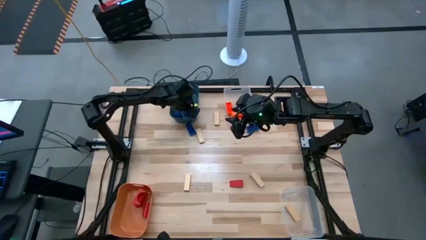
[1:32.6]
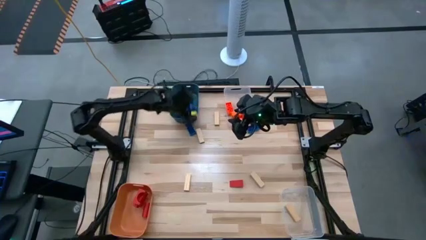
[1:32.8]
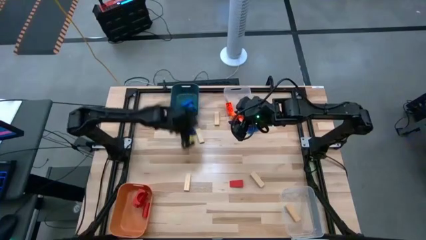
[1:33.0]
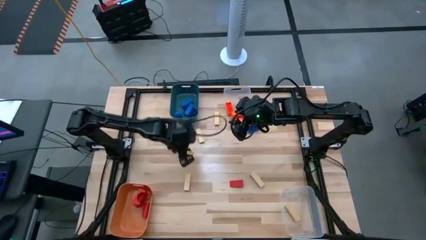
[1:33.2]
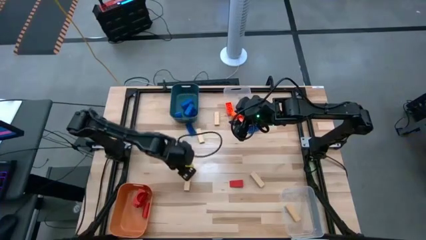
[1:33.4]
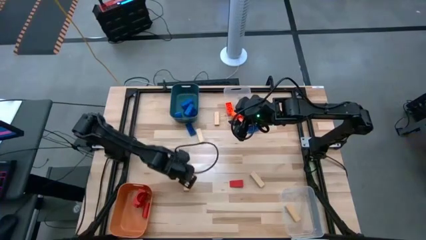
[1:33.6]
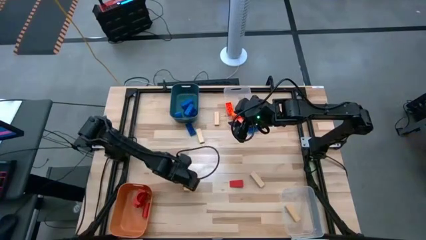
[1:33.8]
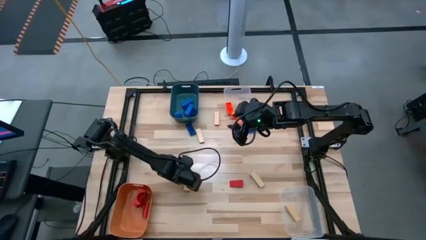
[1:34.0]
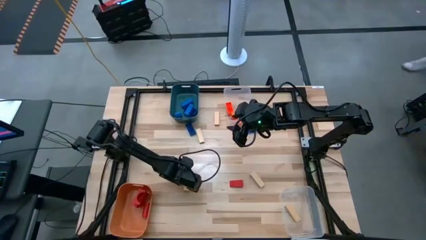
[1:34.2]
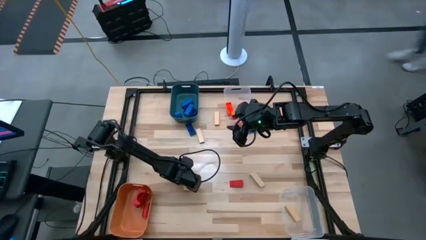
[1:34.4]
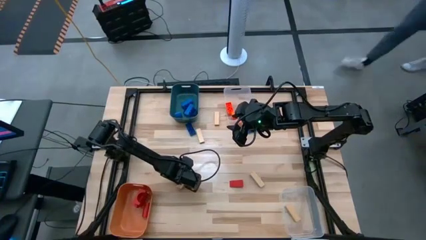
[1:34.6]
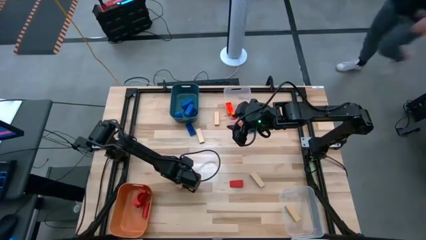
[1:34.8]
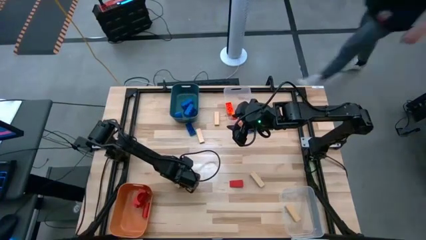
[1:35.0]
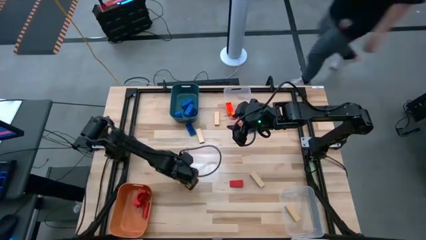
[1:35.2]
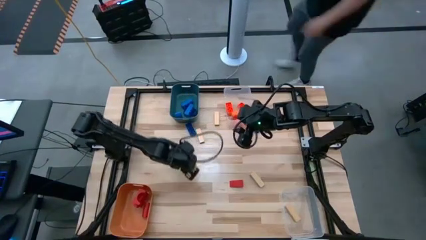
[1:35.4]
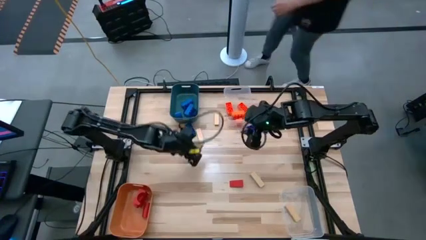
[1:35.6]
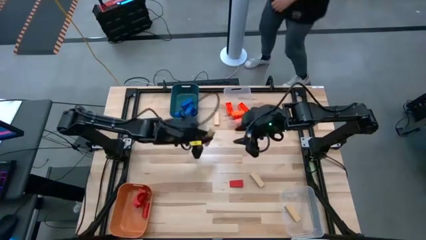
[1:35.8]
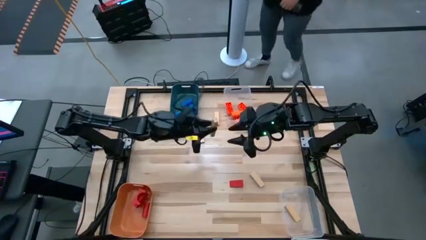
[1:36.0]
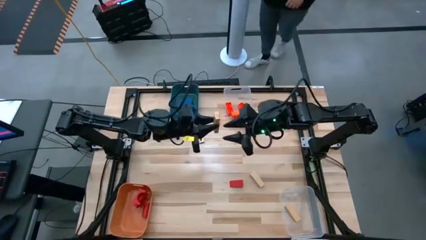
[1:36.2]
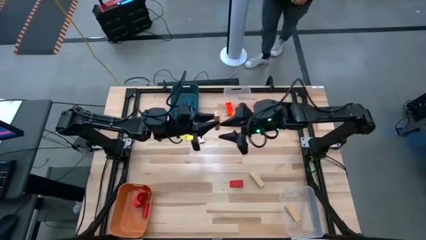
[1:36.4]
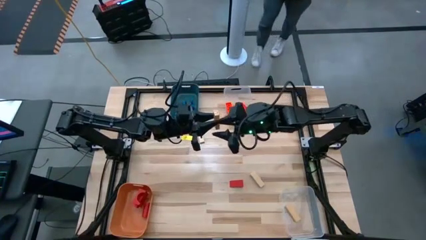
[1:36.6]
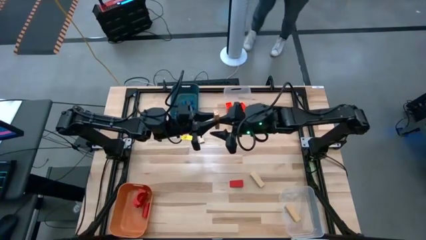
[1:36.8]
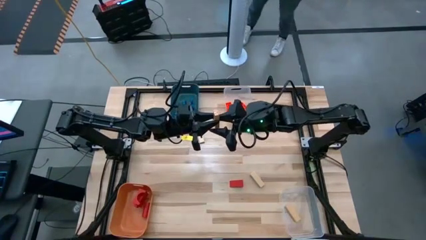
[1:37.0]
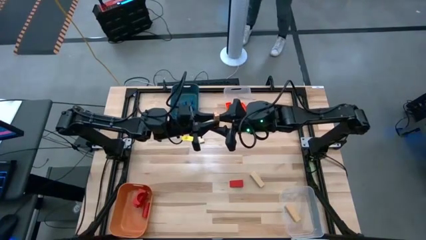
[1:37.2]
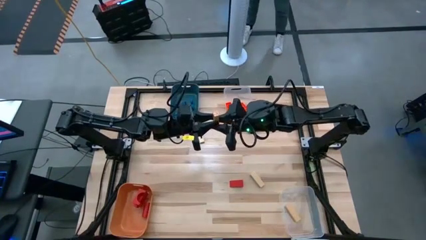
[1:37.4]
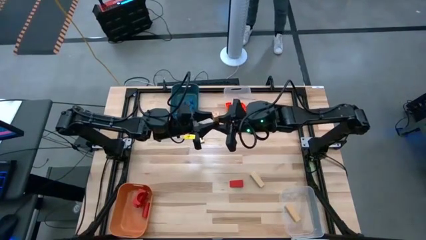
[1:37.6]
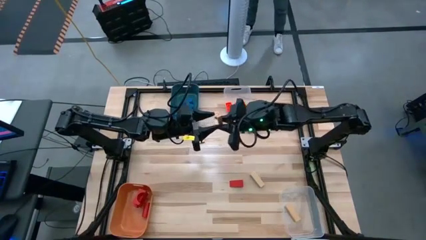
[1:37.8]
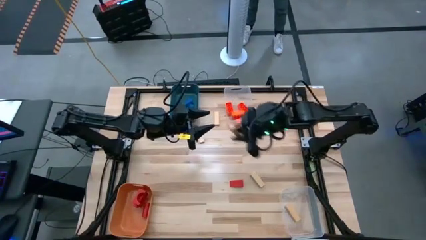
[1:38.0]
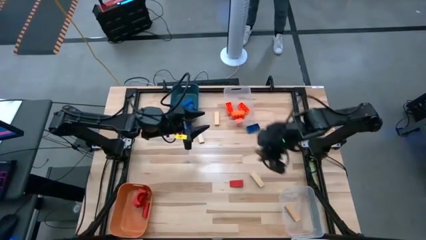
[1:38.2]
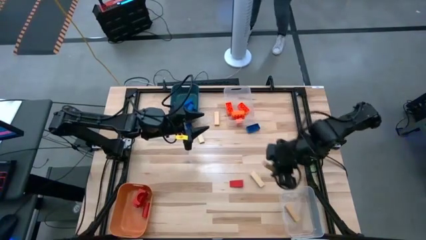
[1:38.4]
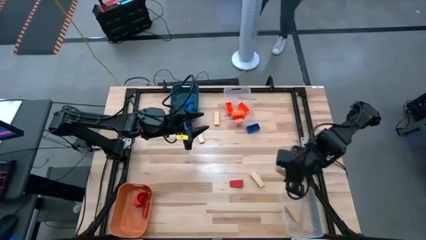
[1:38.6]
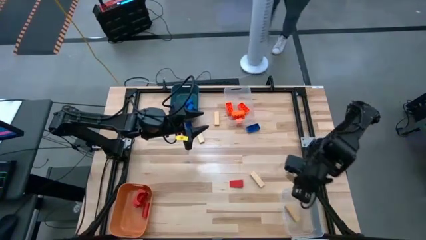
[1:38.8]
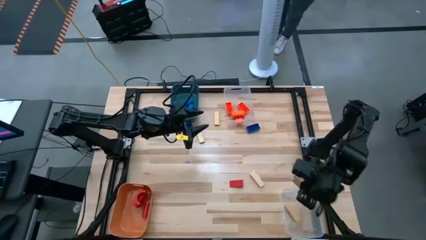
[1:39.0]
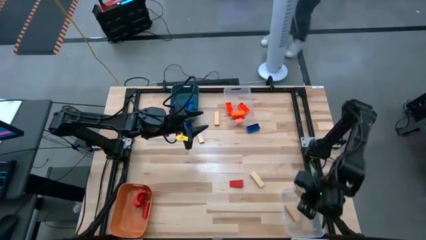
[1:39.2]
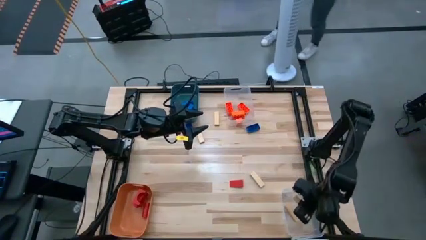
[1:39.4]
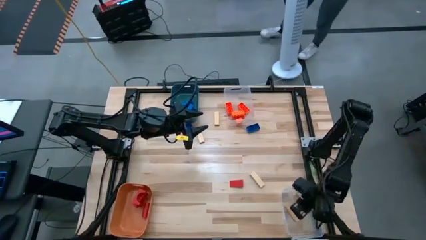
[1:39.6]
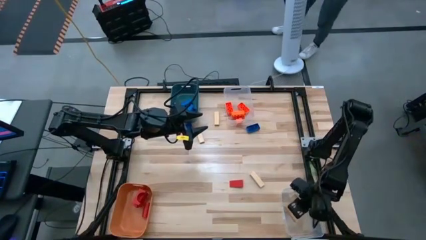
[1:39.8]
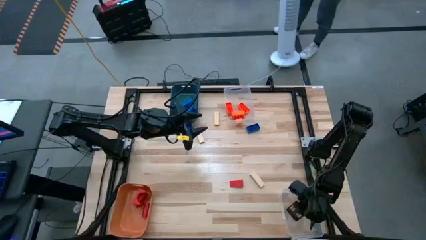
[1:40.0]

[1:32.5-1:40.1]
Task: Sort blocks
Put the brown block into the bottom transparent bin

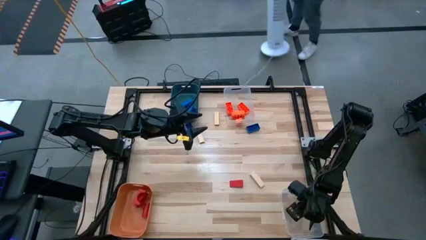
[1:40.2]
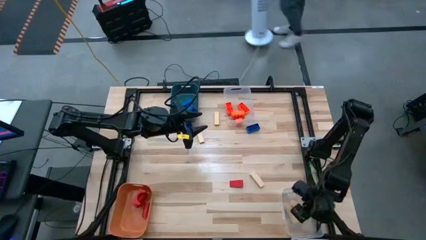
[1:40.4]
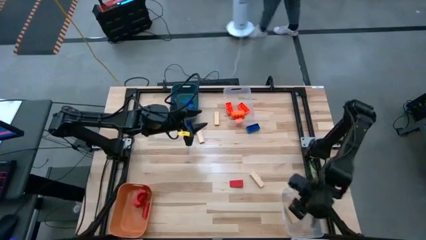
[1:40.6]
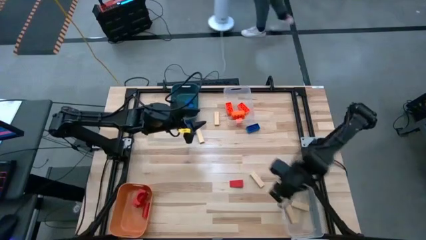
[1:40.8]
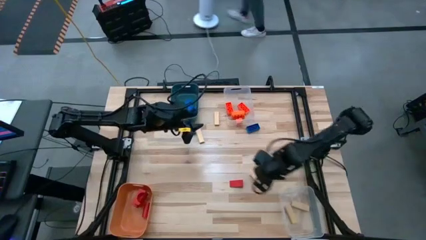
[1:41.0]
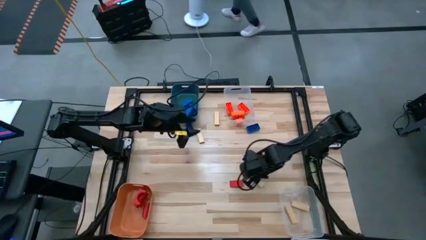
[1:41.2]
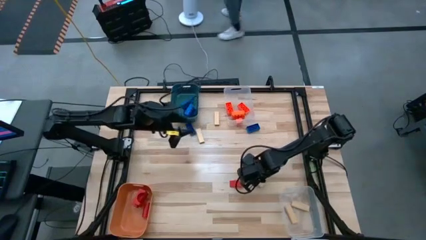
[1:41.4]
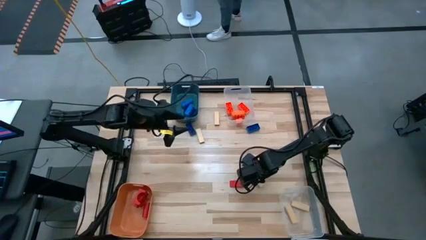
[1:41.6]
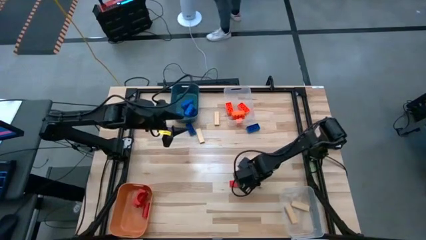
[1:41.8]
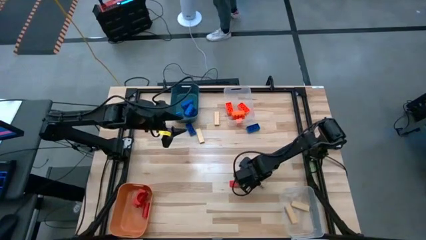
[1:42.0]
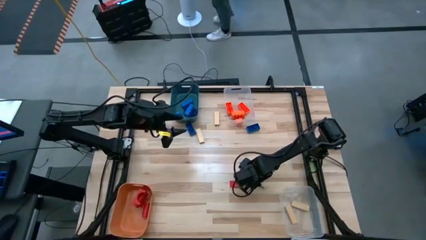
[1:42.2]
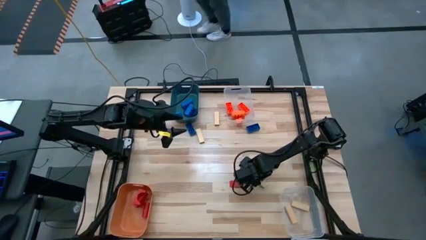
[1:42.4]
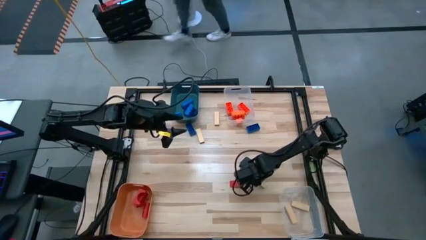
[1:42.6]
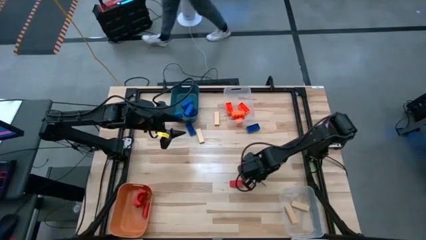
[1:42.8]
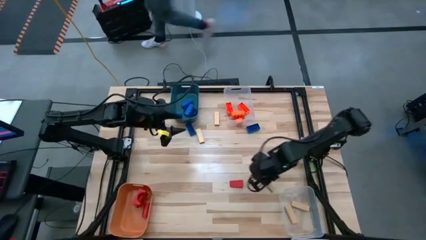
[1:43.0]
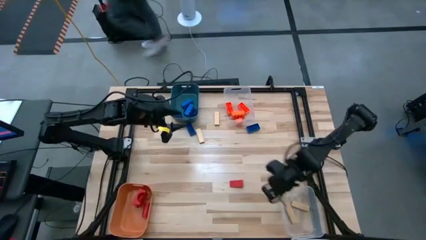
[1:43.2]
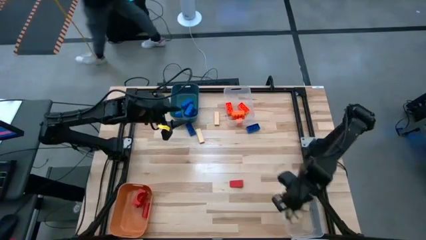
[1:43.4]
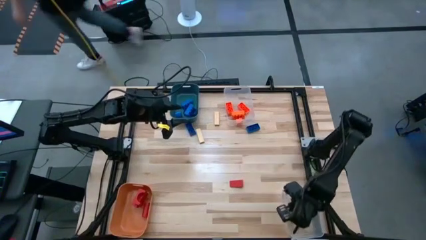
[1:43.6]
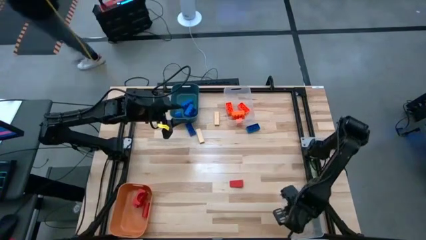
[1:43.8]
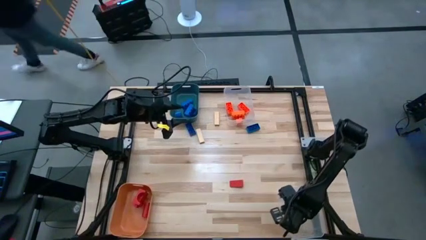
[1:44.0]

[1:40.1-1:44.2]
Put the brown block into the bottom transparent bin

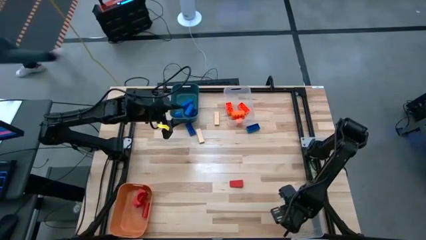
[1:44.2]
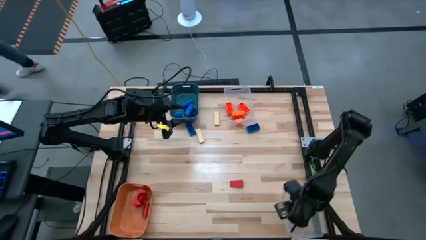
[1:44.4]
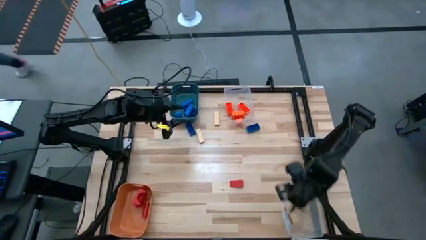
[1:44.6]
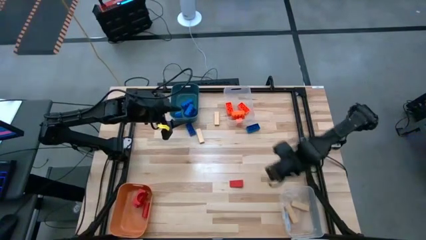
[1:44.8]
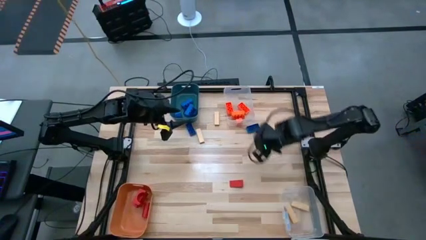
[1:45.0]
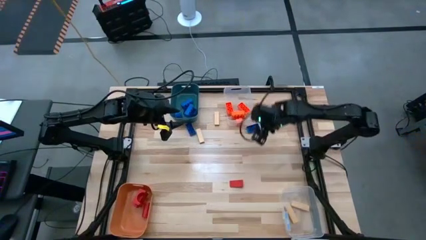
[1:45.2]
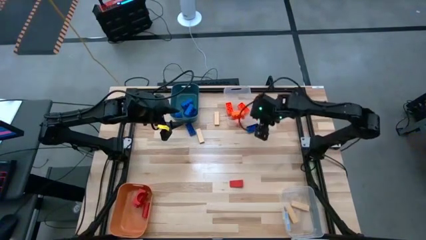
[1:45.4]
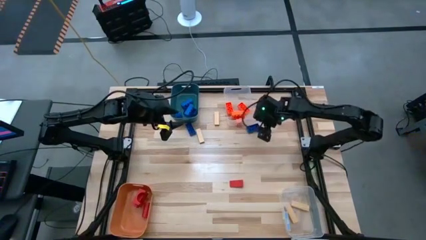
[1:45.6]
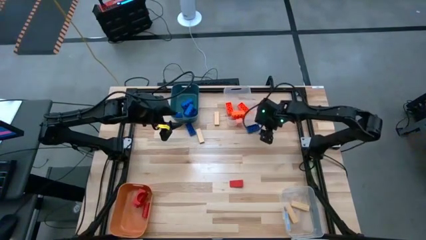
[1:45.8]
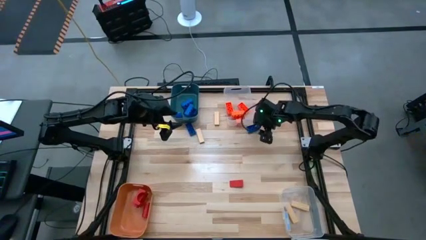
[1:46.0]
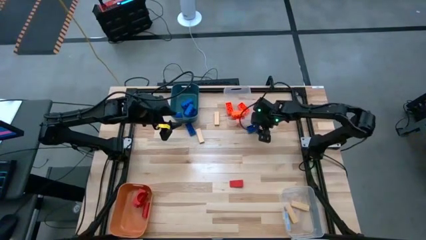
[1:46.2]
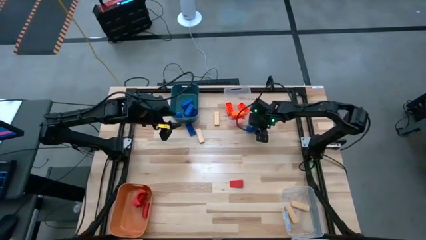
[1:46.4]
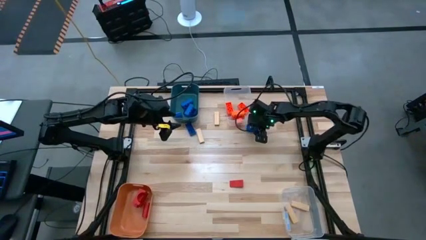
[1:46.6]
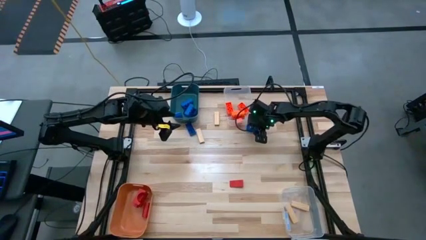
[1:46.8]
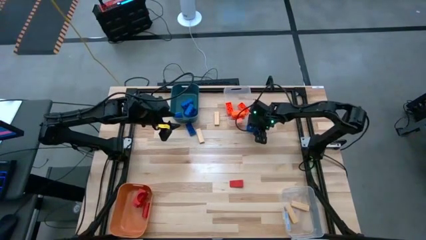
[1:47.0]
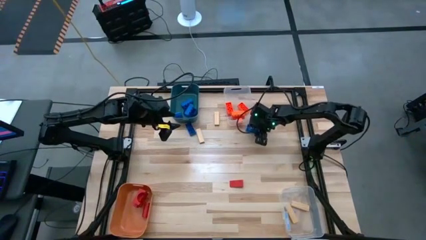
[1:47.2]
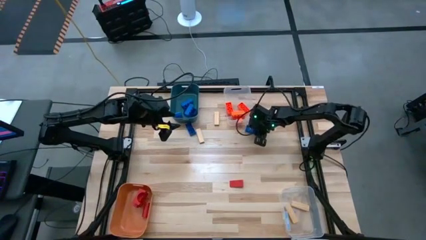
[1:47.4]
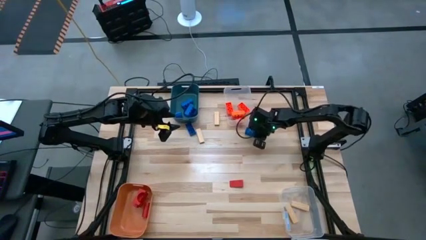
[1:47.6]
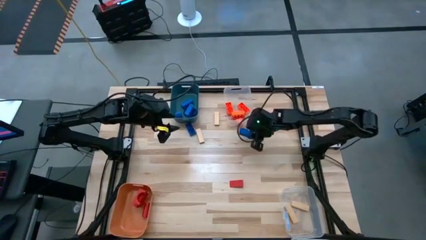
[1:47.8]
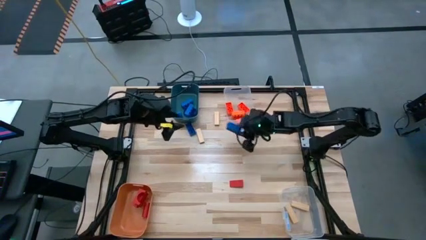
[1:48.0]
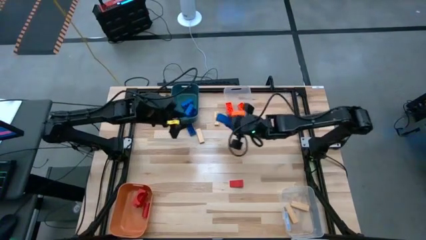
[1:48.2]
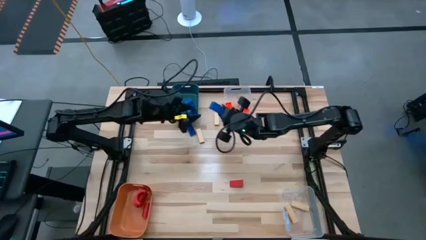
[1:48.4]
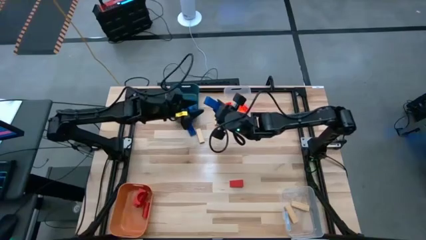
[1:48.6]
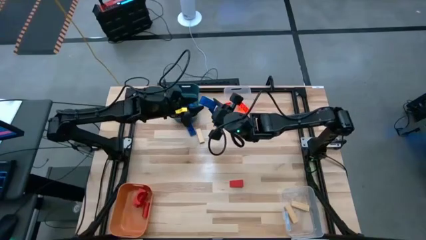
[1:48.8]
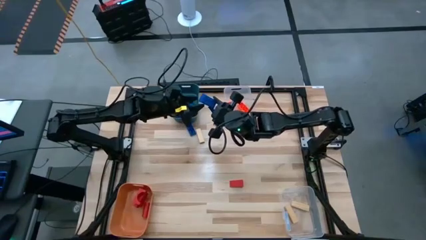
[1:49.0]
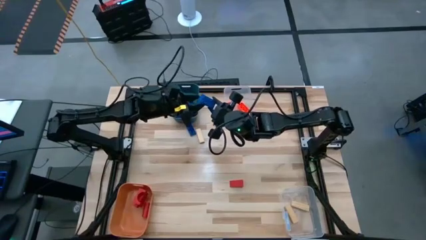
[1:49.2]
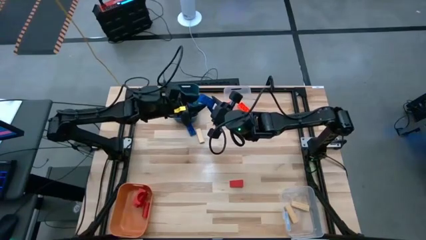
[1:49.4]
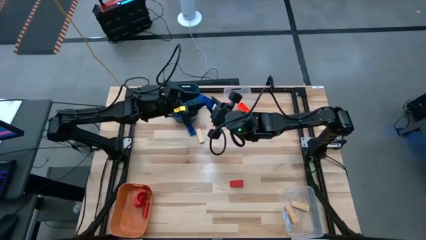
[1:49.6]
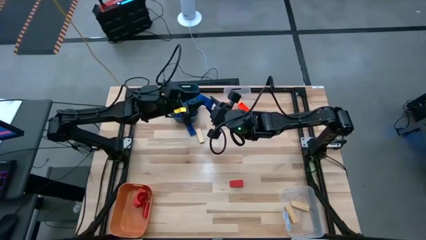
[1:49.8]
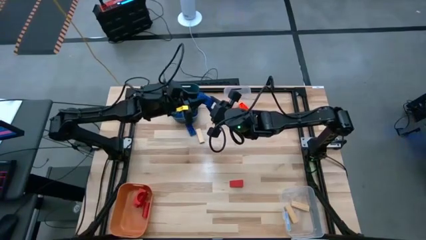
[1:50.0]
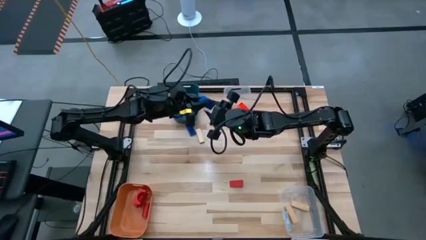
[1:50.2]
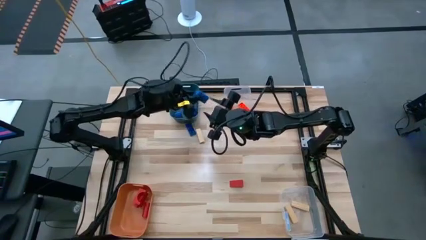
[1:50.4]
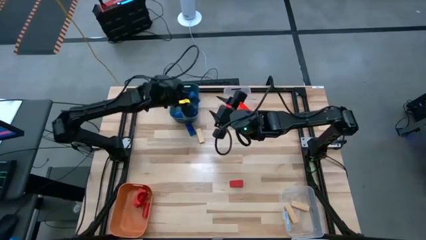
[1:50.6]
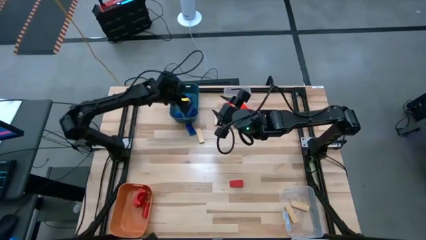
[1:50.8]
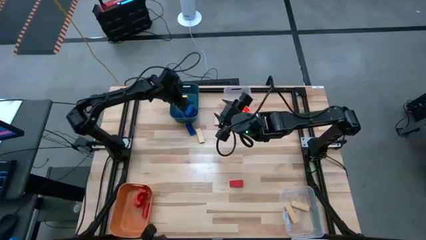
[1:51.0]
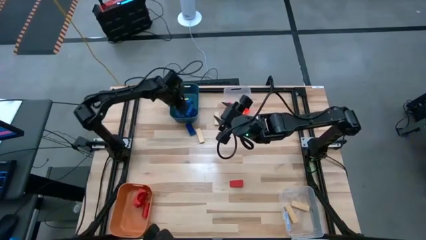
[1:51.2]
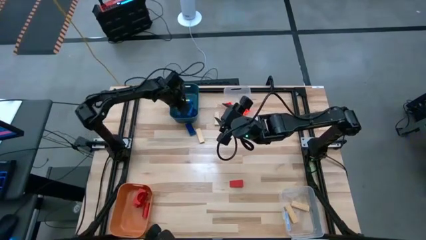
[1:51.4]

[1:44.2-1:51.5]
Put the blue game piece into the dark blue bin
